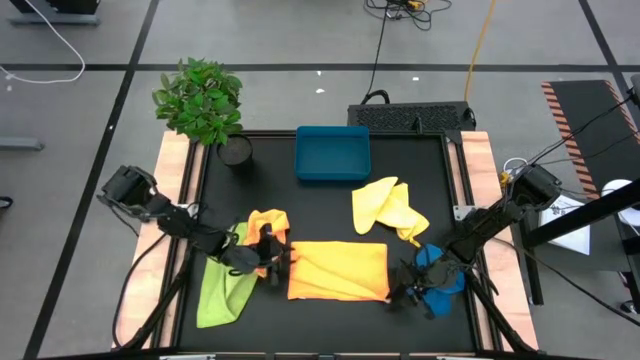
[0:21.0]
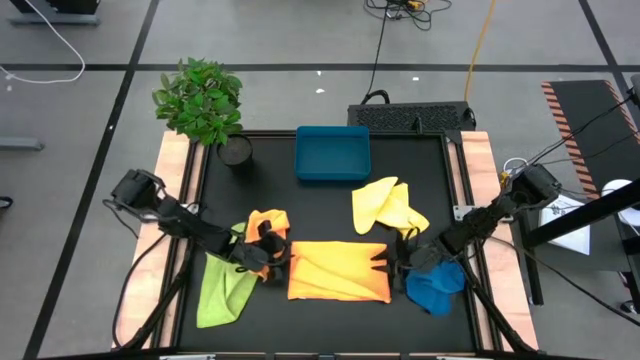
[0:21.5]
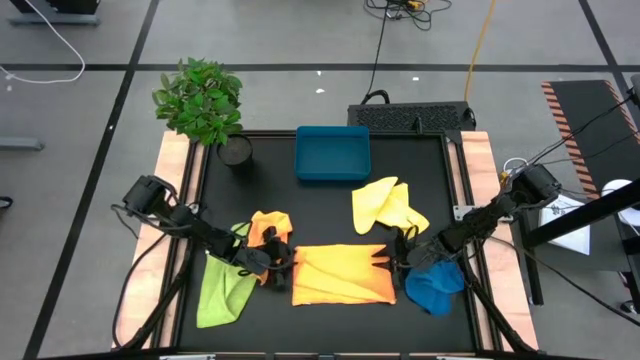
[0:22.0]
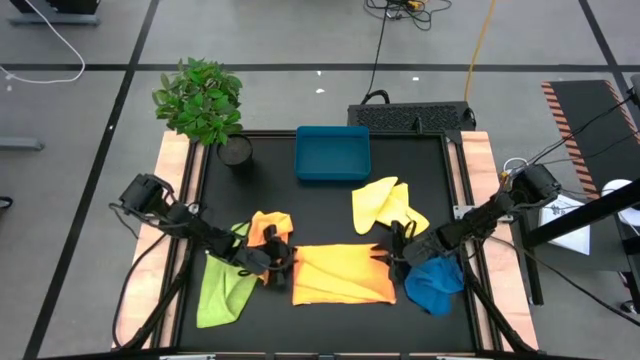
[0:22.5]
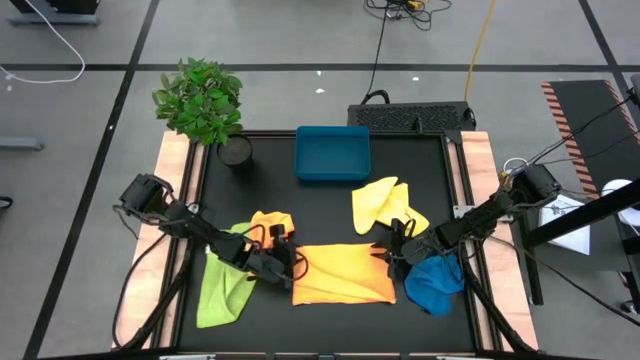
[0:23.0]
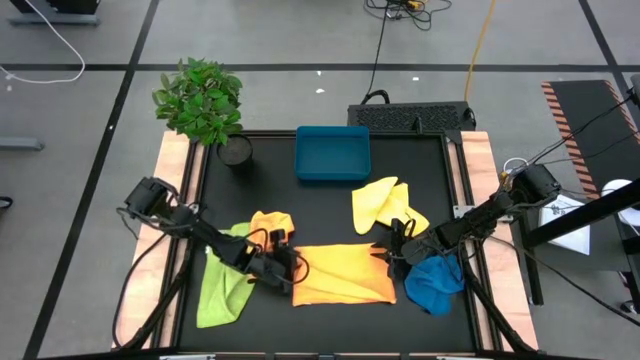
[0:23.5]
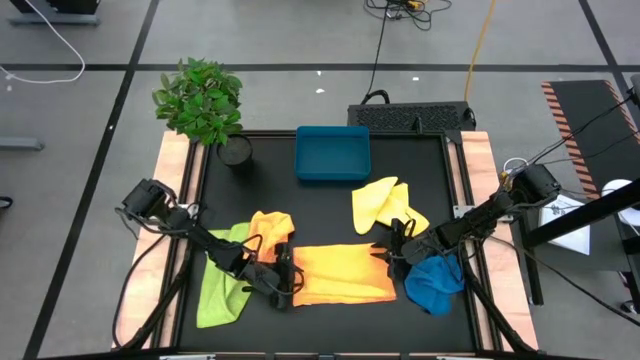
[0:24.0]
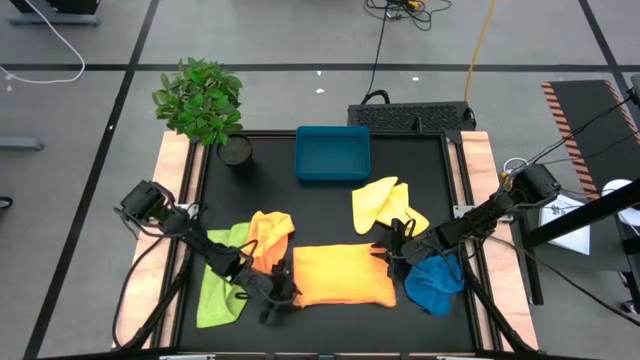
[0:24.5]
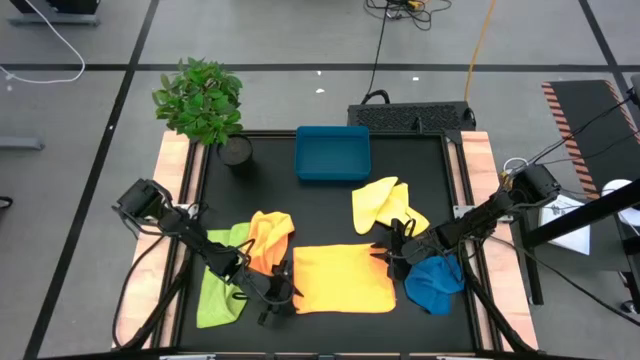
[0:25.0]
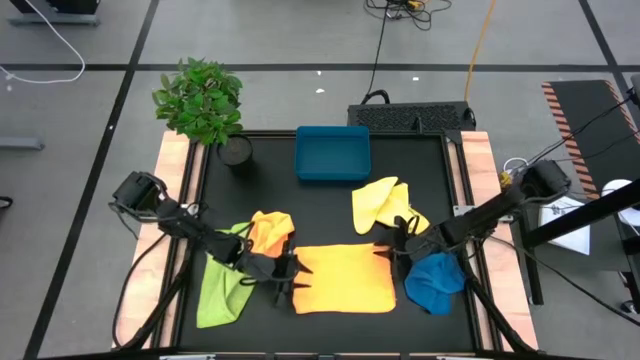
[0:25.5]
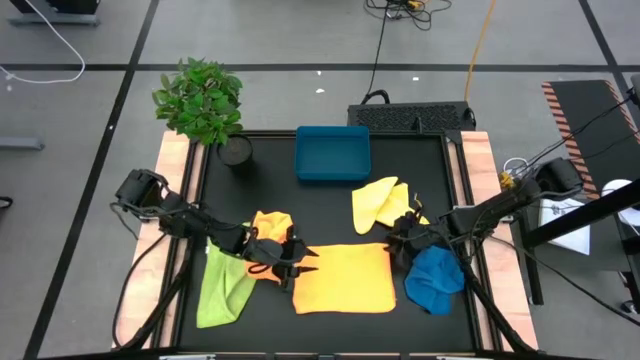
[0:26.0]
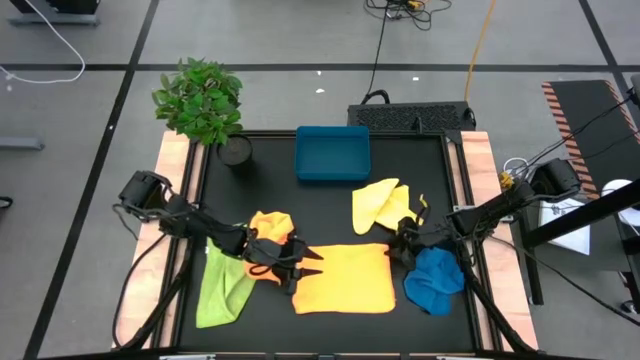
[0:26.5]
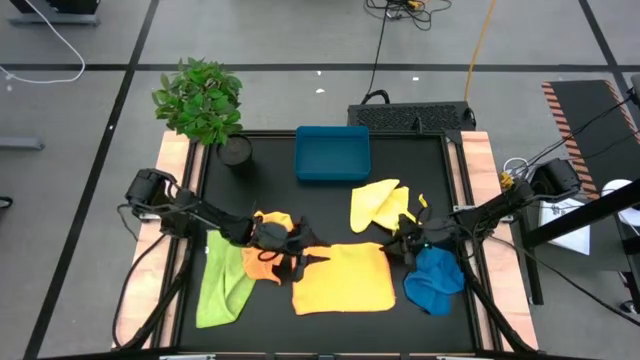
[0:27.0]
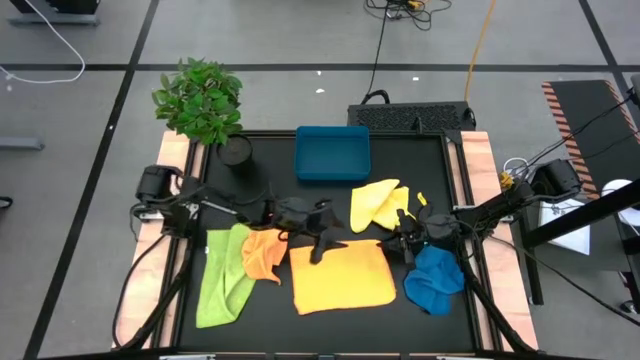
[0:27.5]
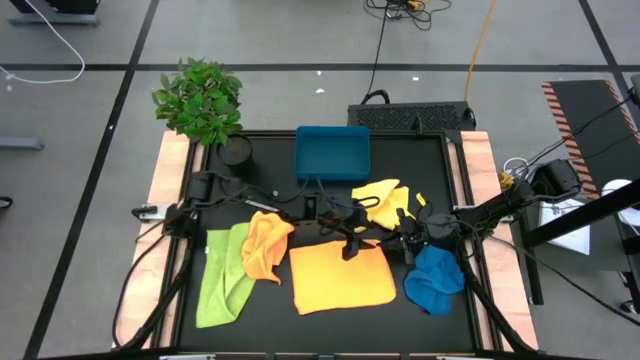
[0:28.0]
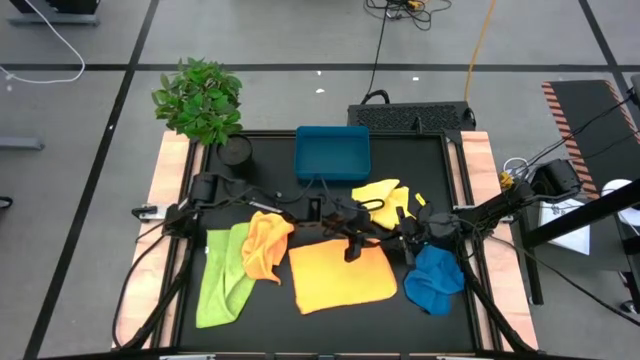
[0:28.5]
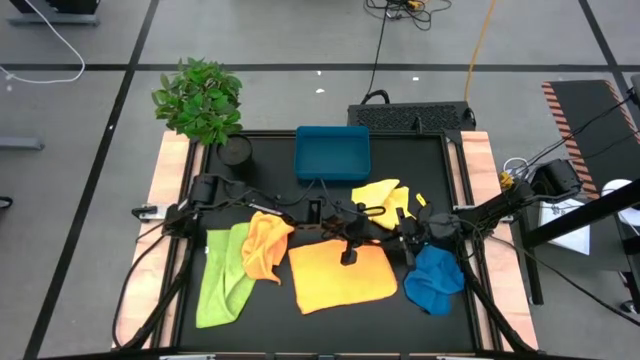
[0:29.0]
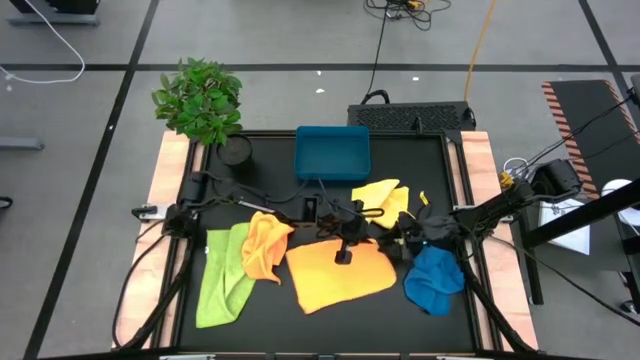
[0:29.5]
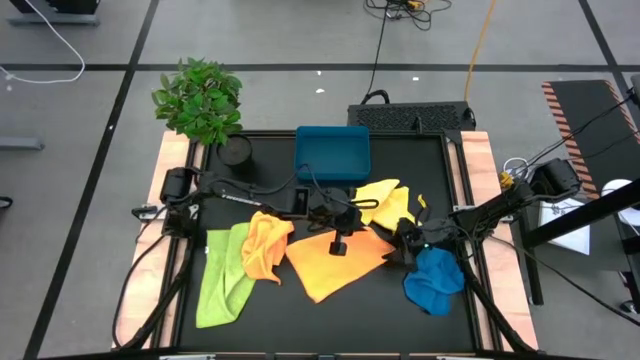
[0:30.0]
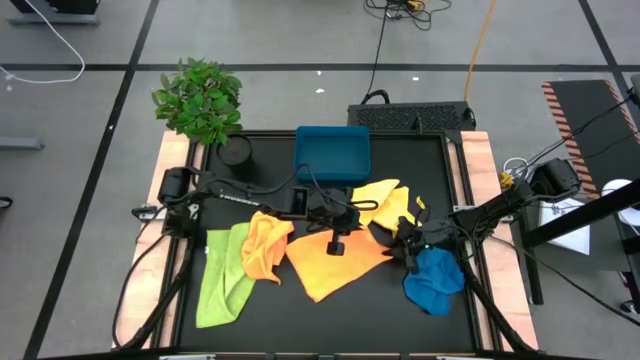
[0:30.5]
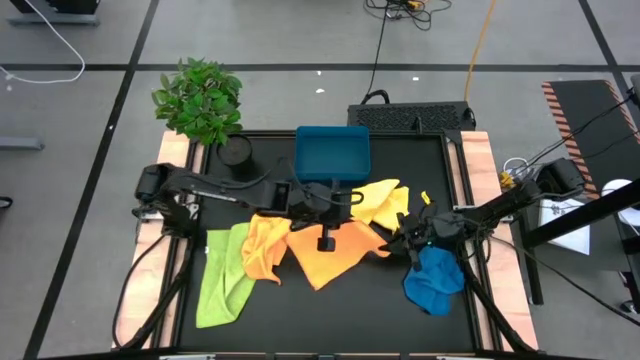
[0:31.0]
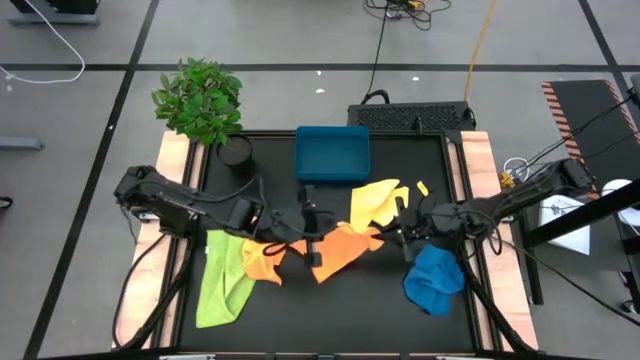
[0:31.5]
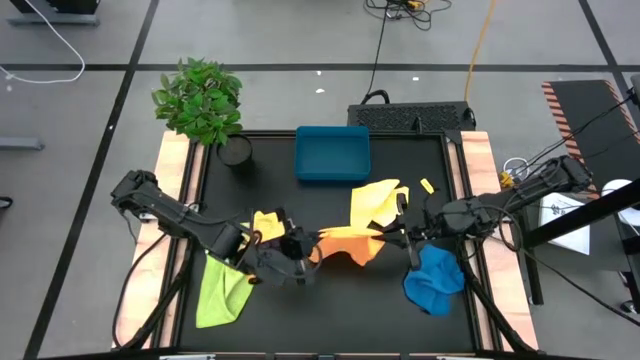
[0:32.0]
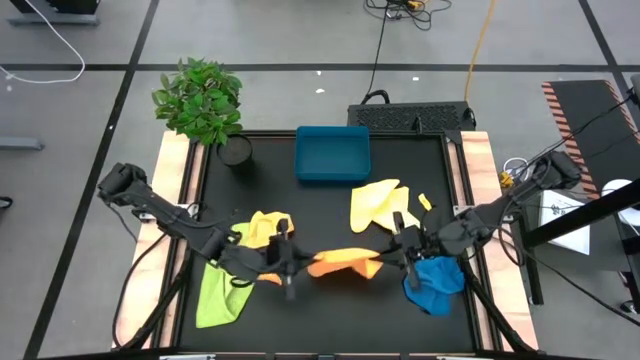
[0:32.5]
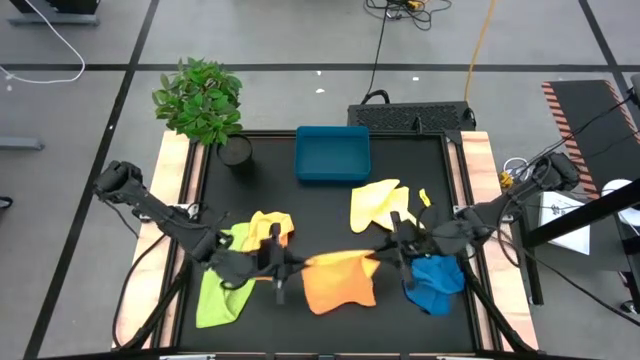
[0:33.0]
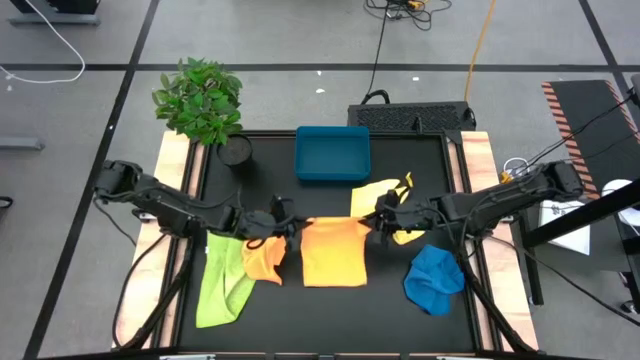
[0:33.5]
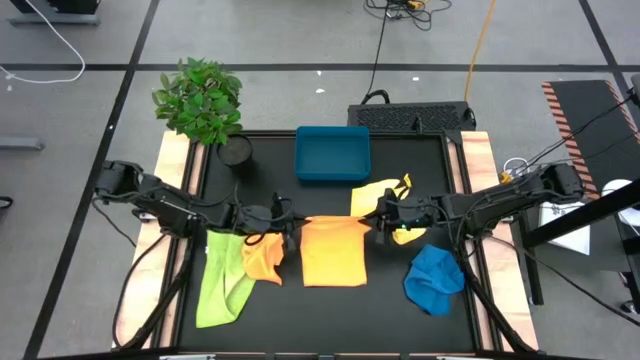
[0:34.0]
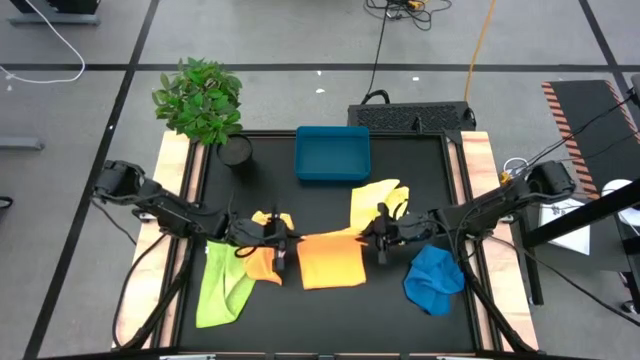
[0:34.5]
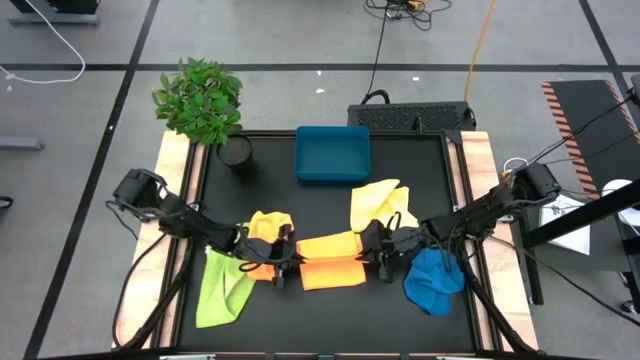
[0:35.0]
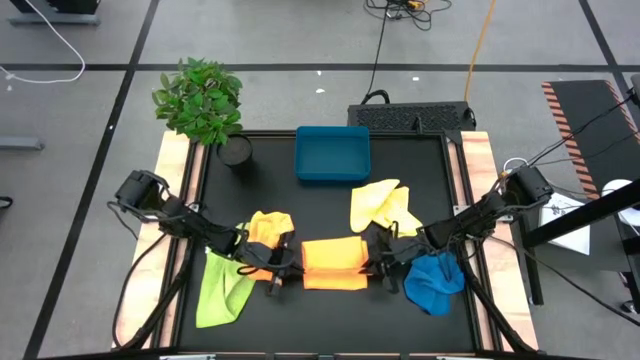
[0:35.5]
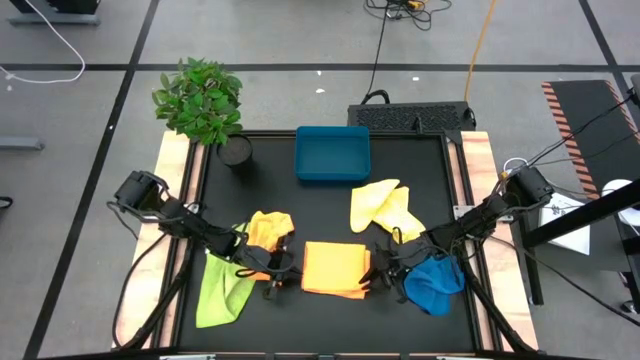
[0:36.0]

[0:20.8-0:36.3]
Task: Fold microfiber towels
Fold the right orange microfiber towel

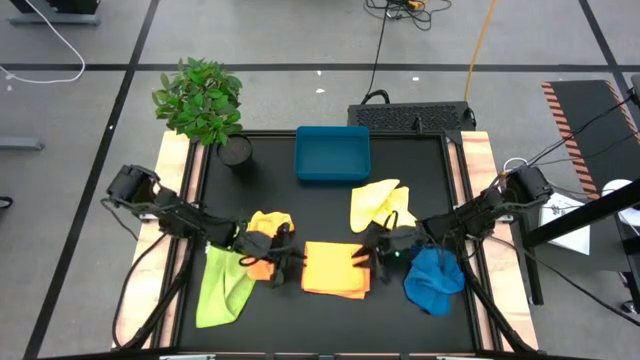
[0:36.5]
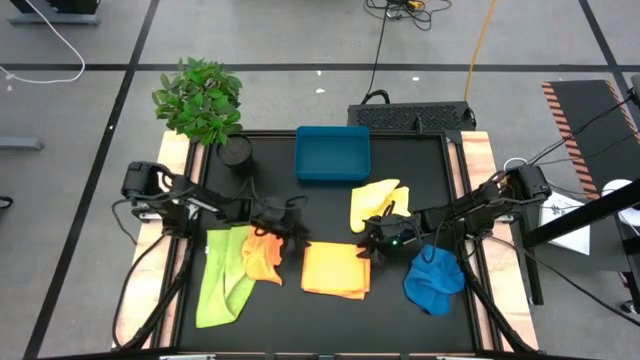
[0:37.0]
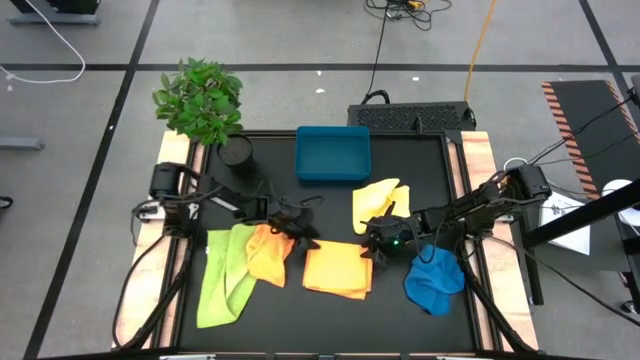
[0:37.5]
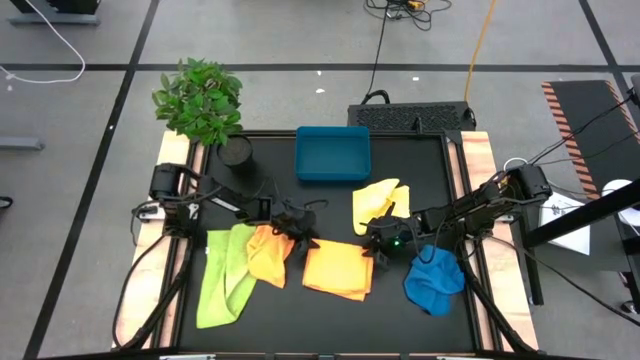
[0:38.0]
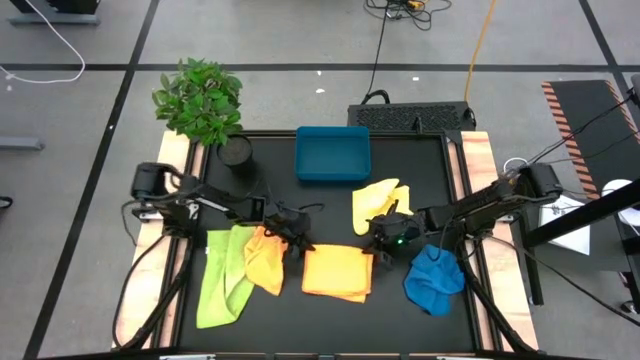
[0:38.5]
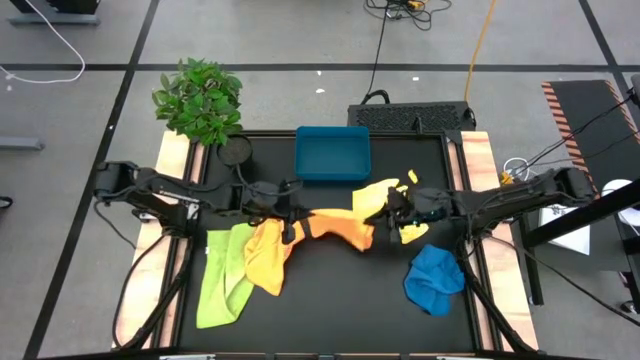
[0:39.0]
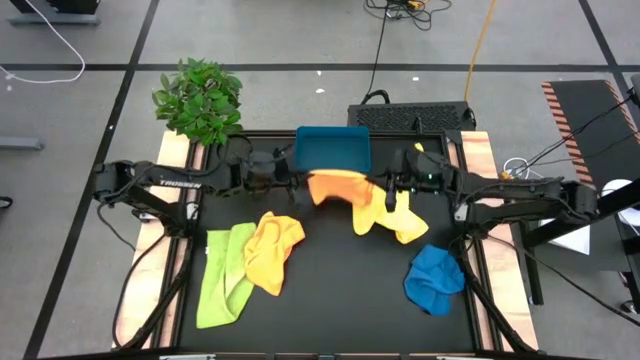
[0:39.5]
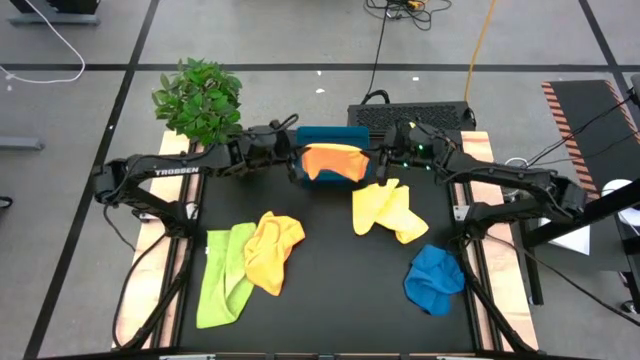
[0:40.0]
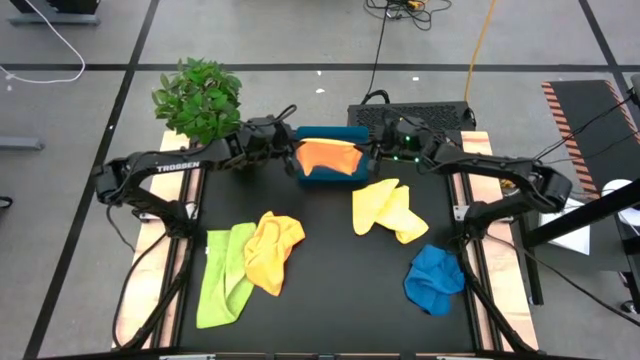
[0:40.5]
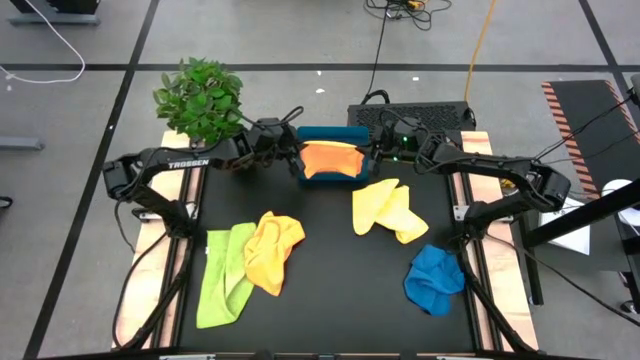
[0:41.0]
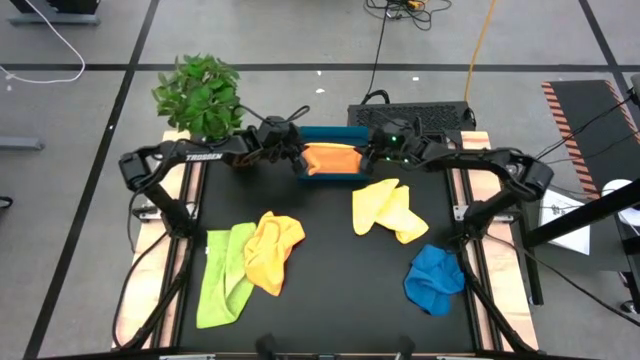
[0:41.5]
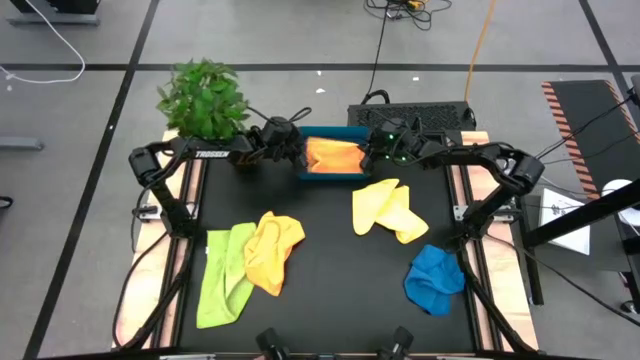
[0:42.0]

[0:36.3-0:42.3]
Put the right orange microfiber towel into the blue blue bin
